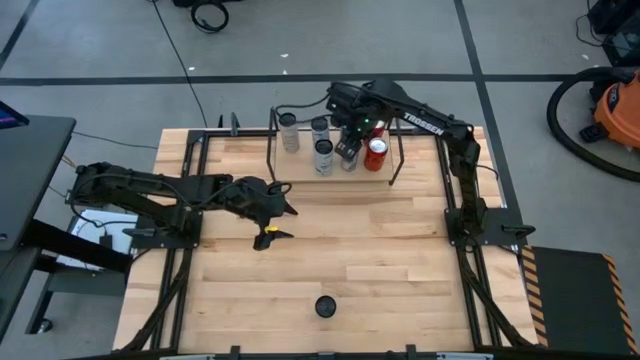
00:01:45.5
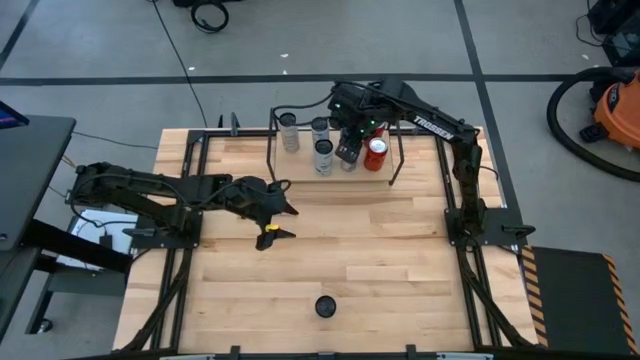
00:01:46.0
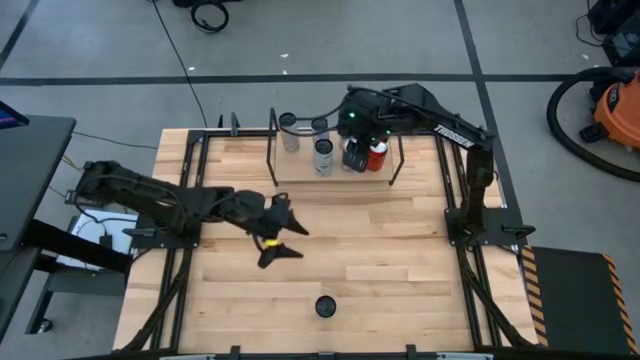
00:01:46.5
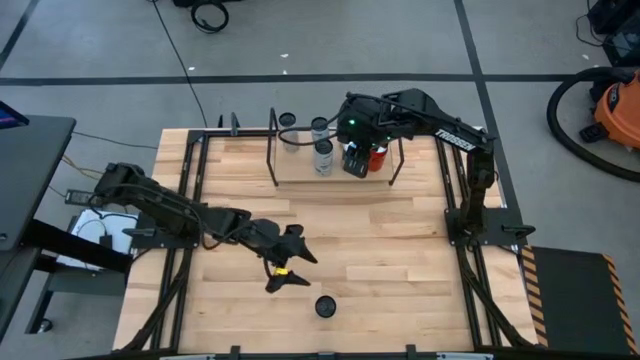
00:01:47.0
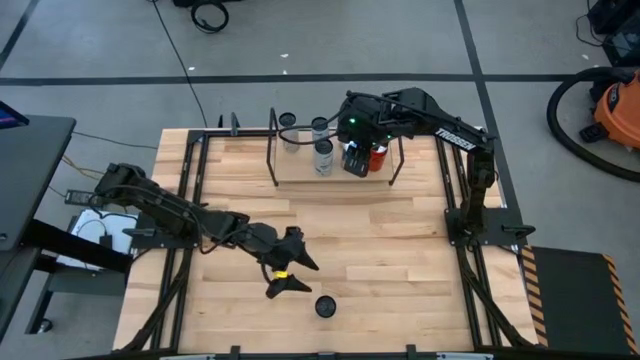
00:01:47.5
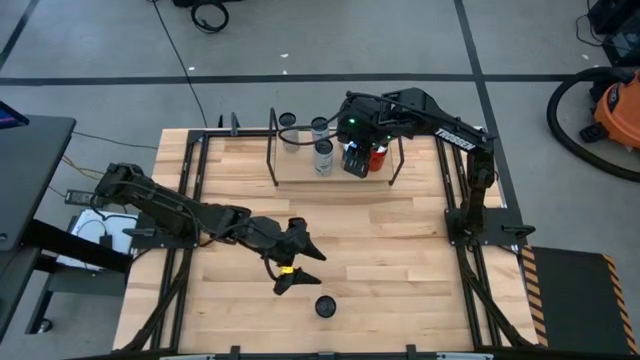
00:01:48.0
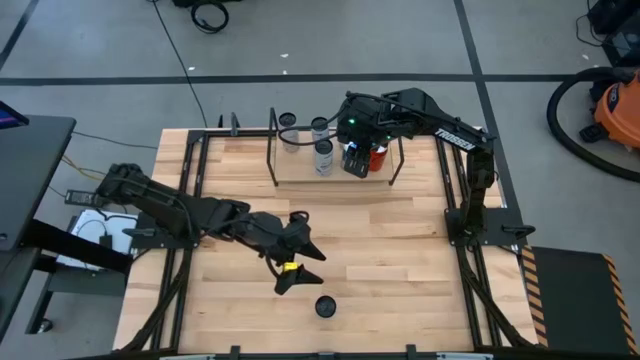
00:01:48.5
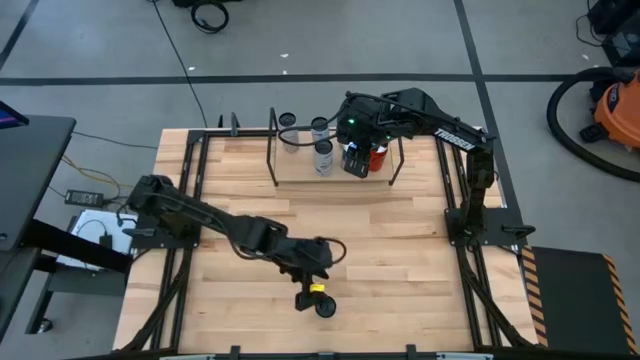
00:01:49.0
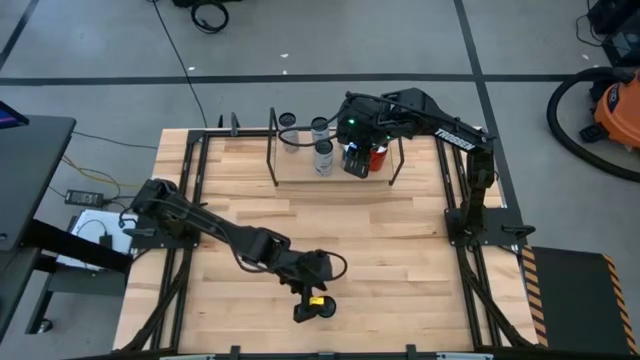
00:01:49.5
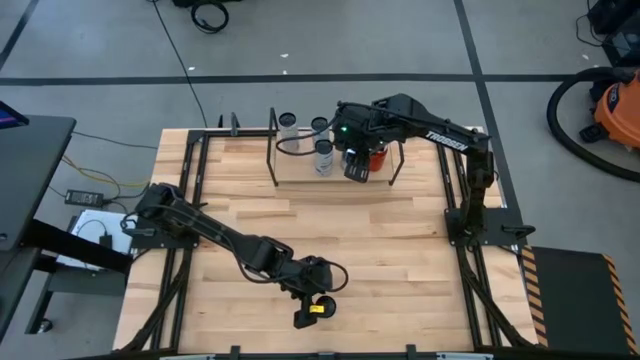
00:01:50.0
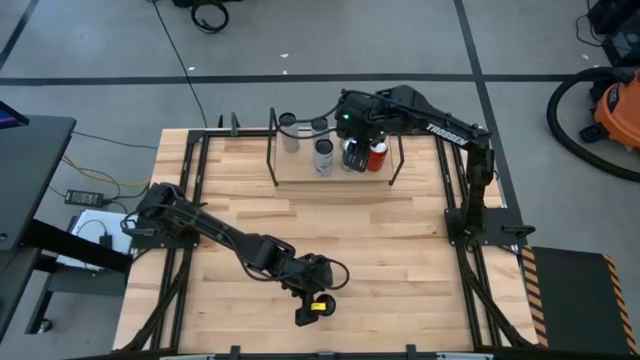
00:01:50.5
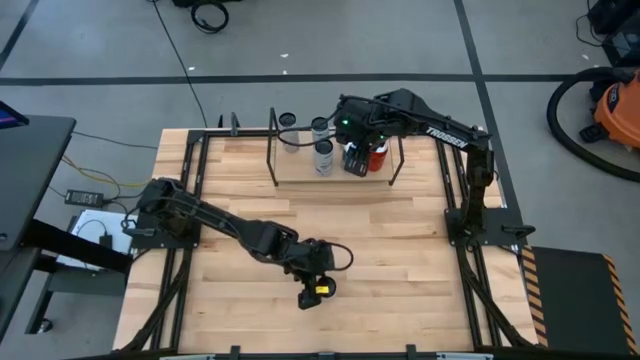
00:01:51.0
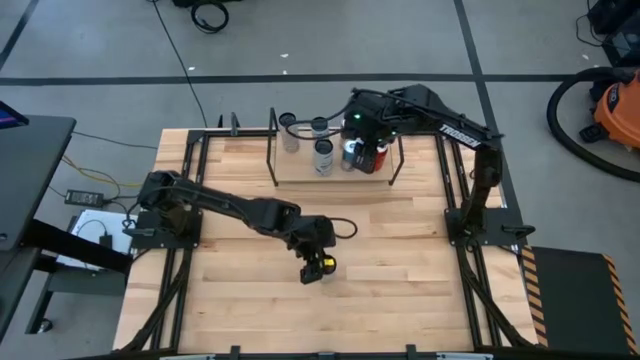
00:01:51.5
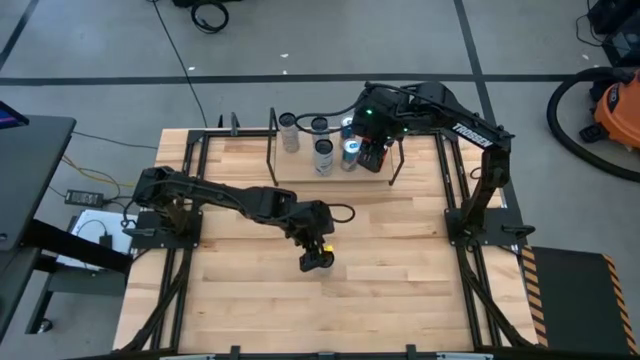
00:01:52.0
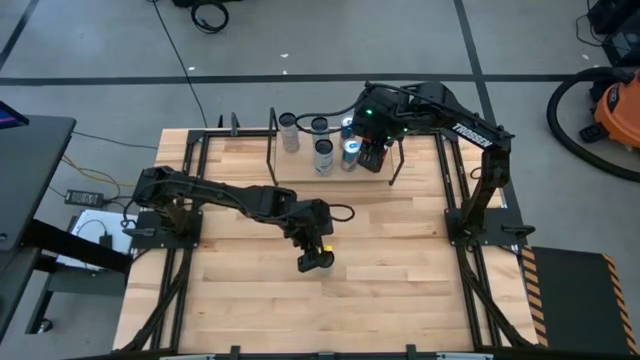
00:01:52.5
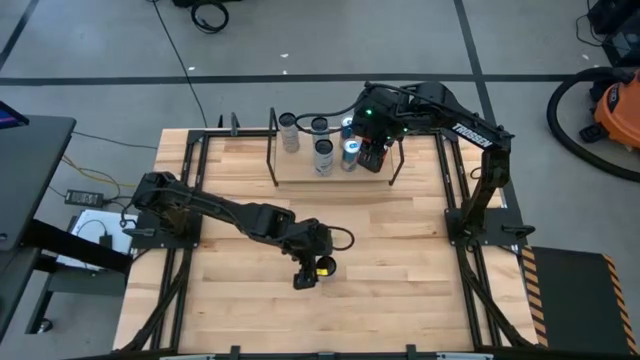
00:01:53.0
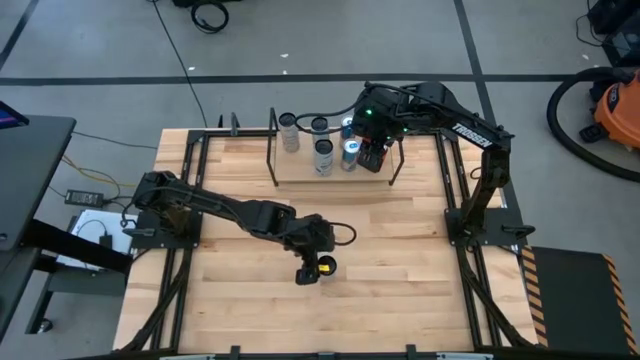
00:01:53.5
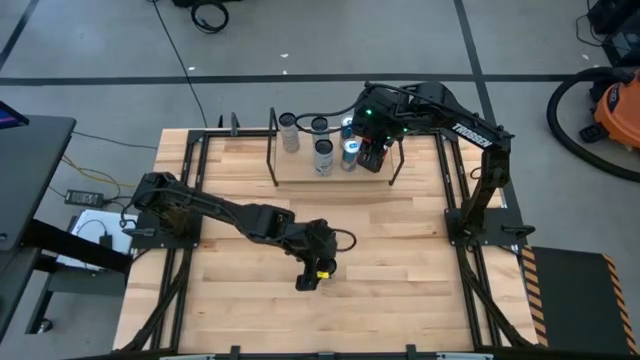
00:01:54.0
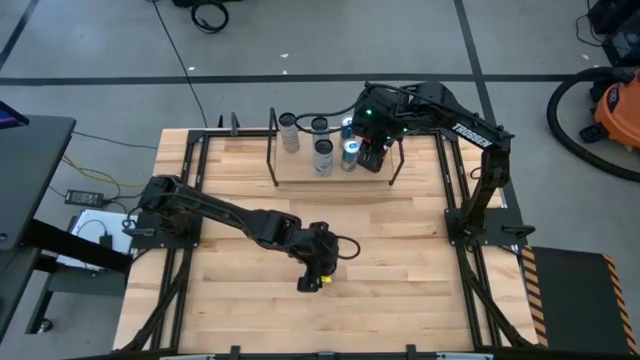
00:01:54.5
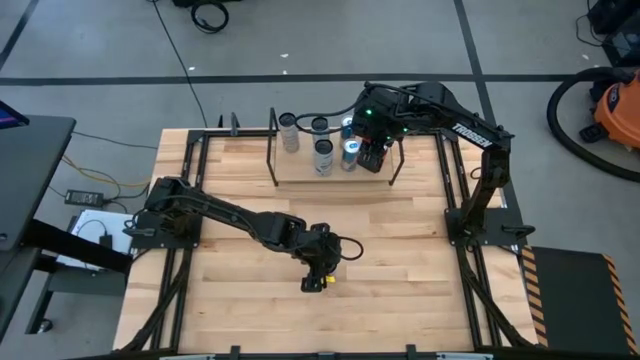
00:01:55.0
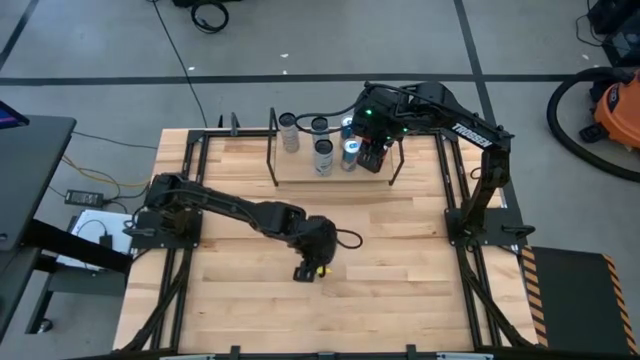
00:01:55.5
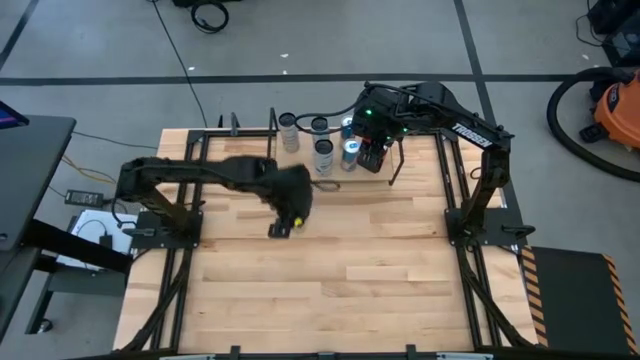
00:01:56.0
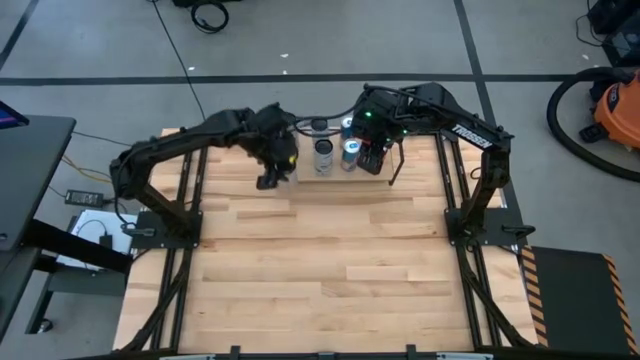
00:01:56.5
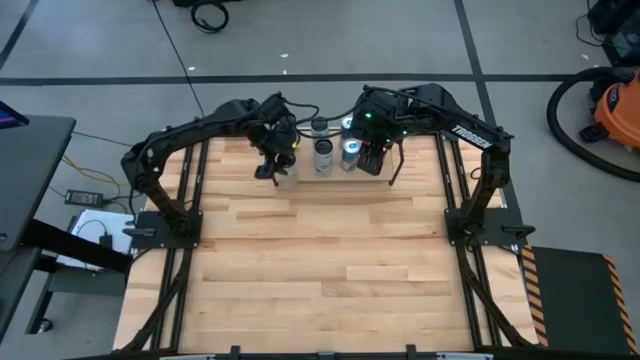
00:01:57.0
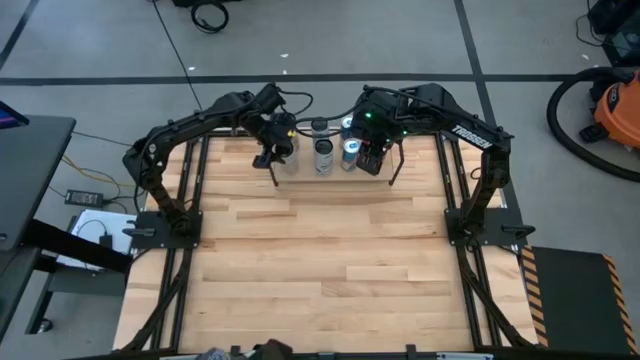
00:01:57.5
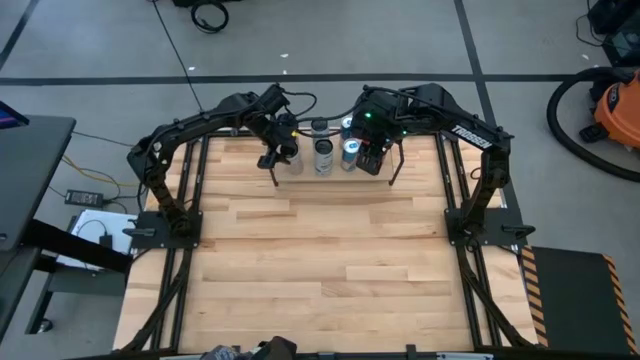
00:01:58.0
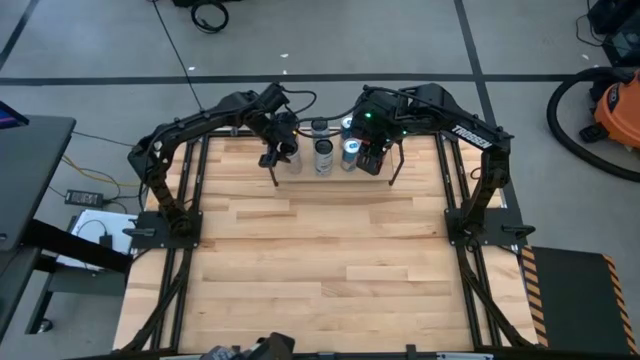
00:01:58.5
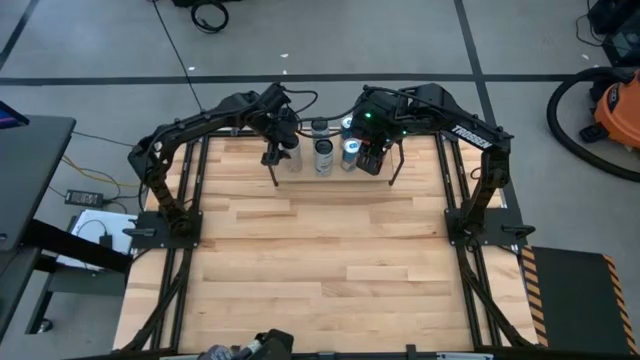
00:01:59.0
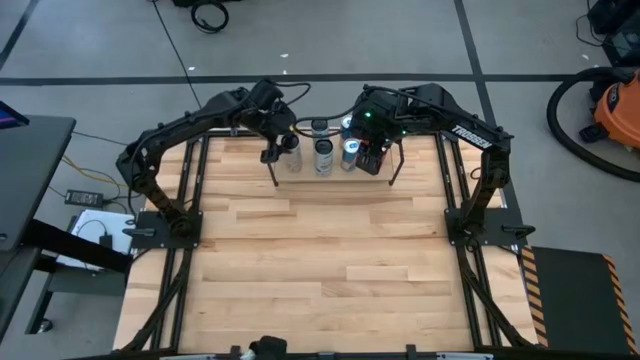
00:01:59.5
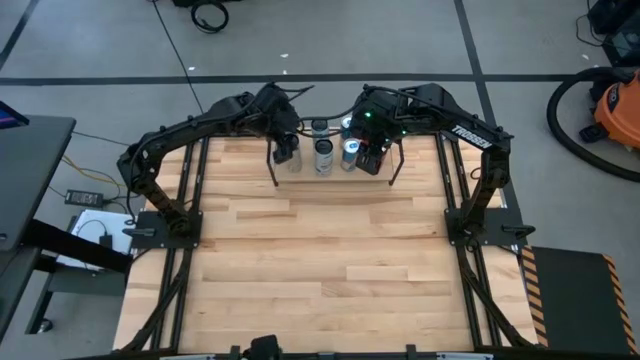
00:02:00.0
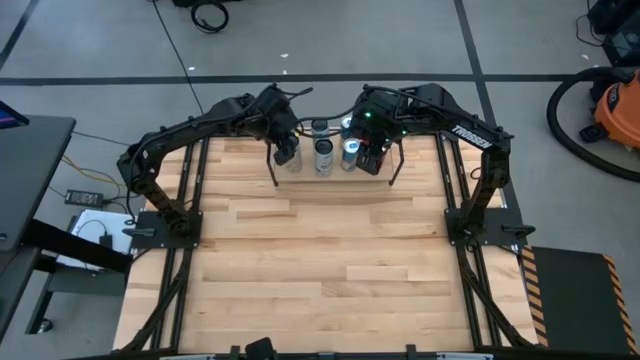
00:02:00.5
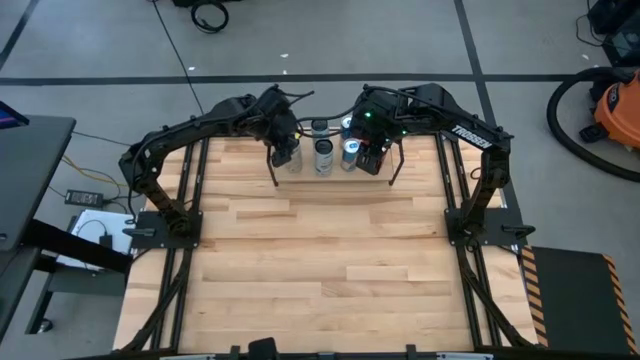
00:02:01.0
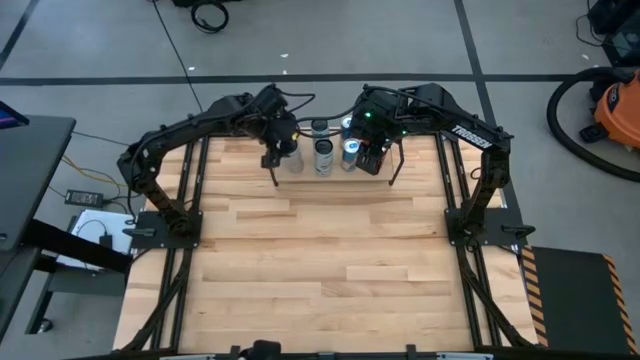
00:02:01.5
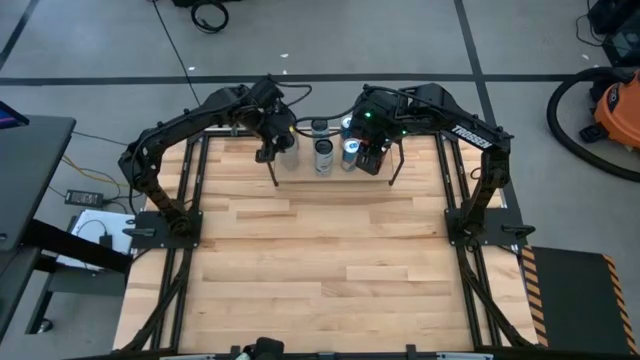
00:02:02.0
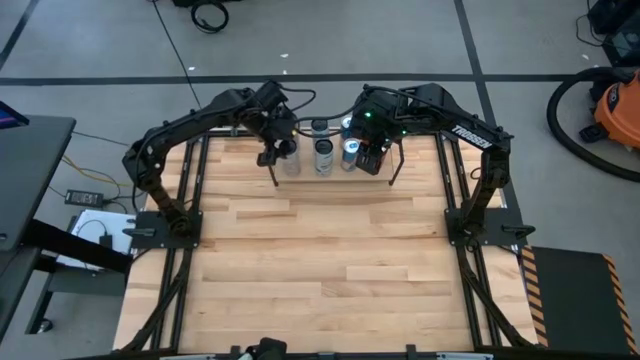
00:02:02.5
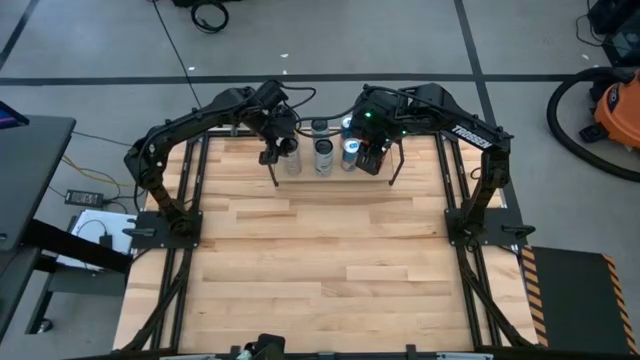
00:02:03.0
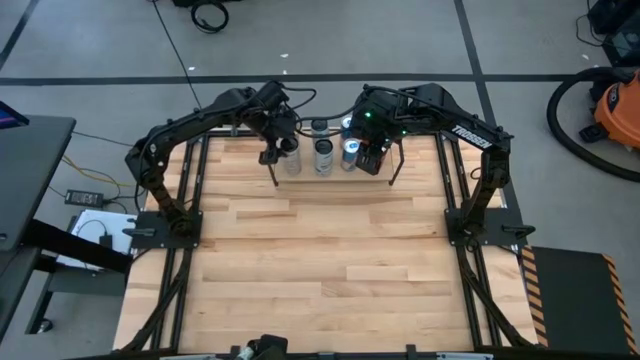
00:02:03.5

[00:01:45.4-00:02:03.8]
Task: Place canned beverage on shelf
Put the white yellow soda can on the shelf aligned with the white yellow soda can

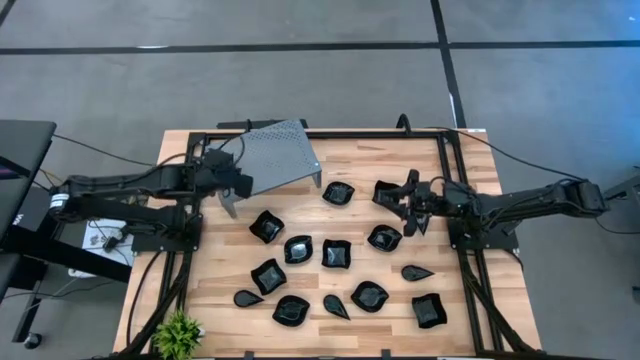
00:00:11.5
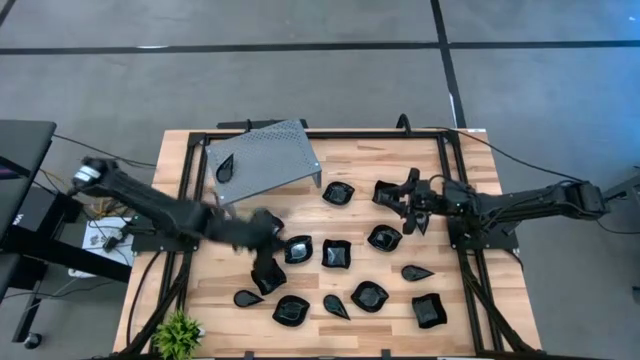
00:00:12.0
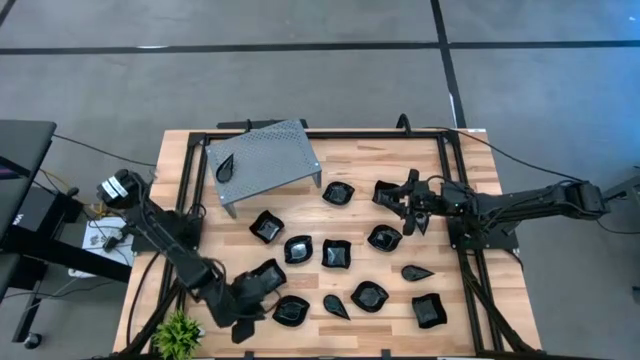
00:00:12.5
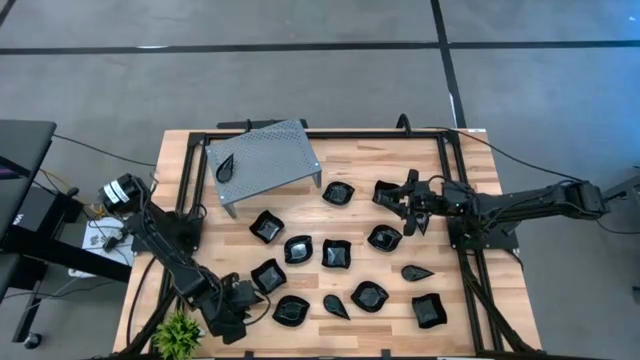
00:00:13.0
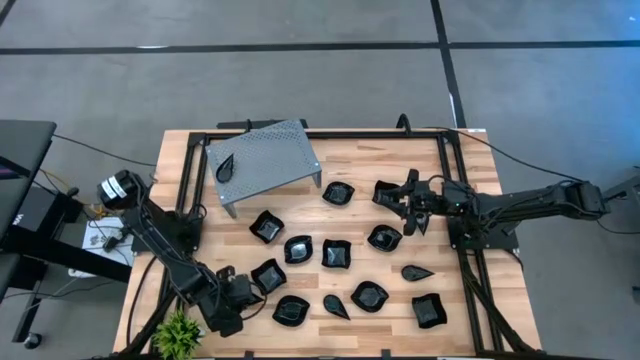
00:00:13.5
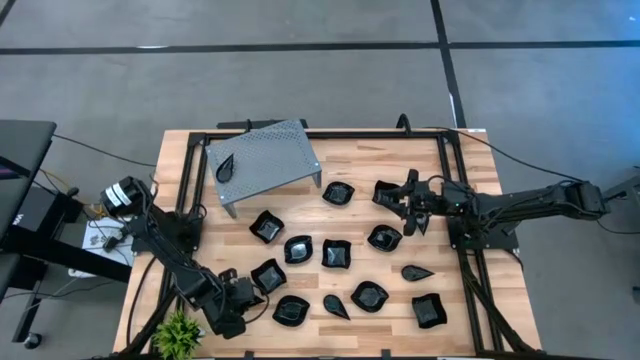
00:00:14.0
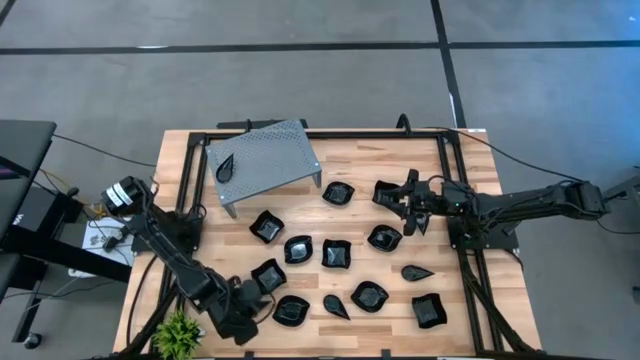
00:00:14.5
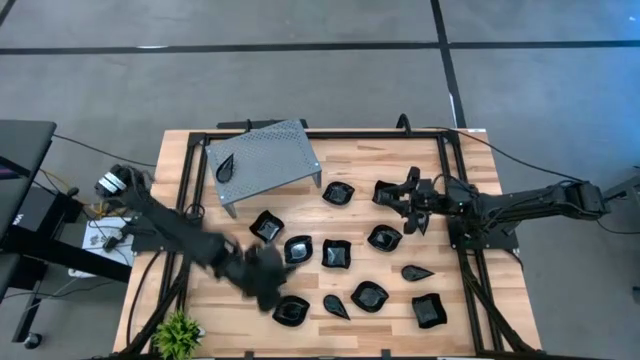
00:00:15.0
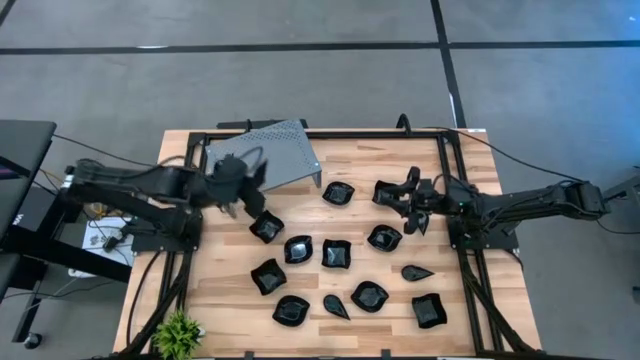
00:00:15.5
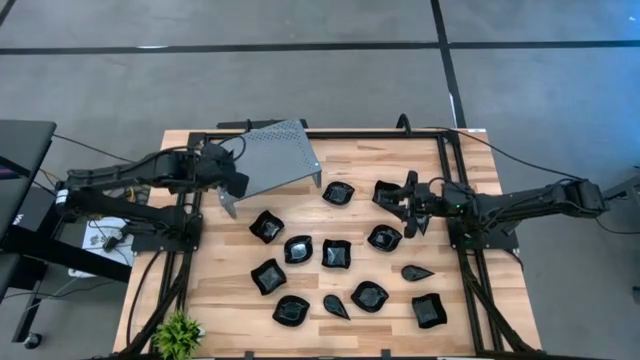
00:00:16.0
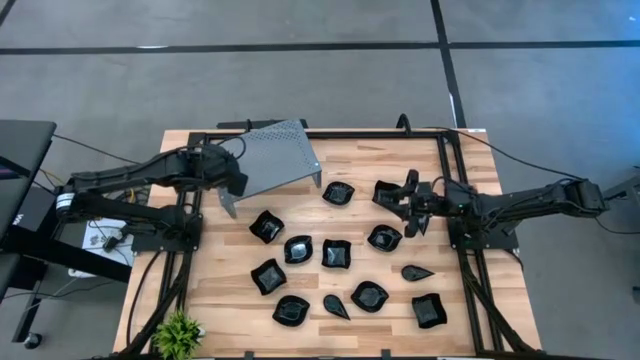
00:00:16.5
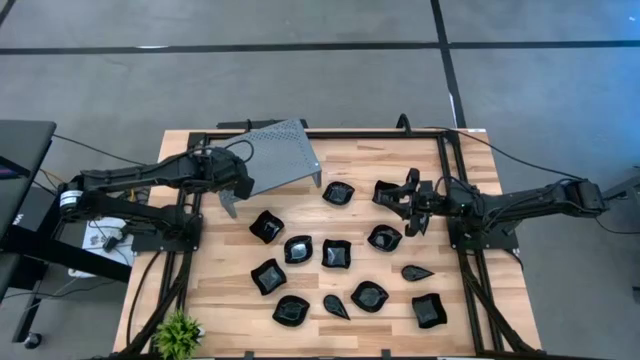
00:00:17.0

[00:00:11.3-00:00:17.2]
Task: Pick & Place Mini shaped plates
Stack the black drop plate on top of the black drop plate on the shelf
